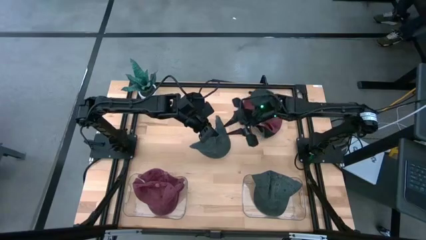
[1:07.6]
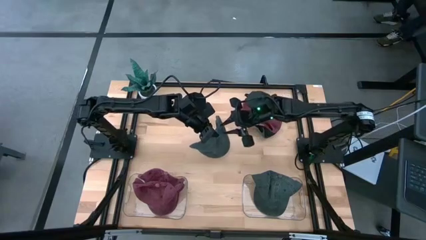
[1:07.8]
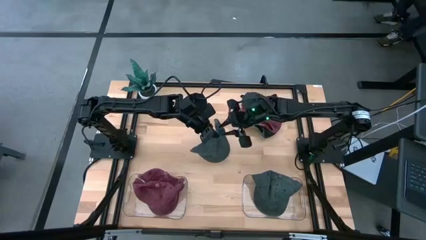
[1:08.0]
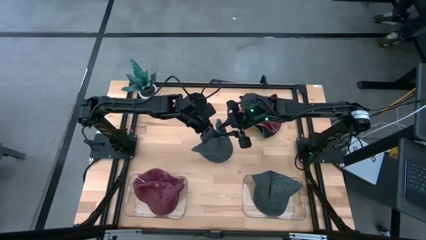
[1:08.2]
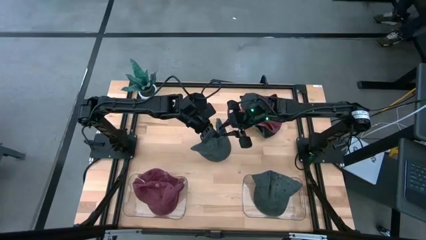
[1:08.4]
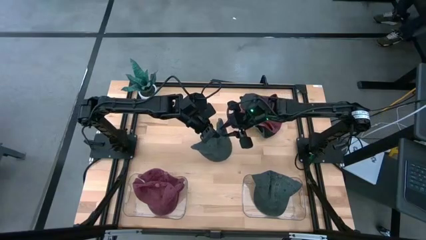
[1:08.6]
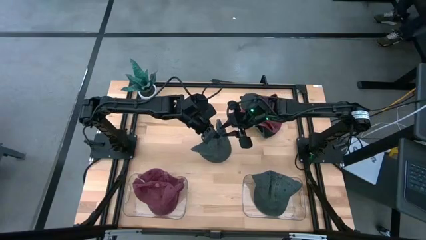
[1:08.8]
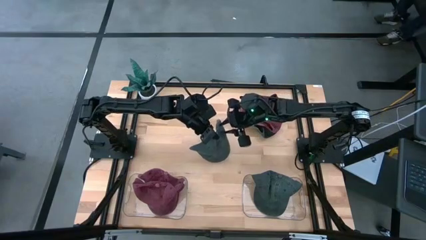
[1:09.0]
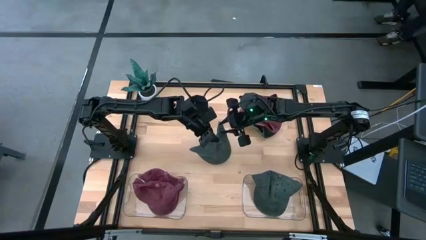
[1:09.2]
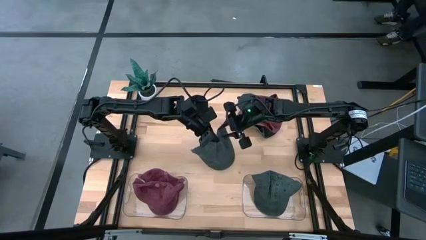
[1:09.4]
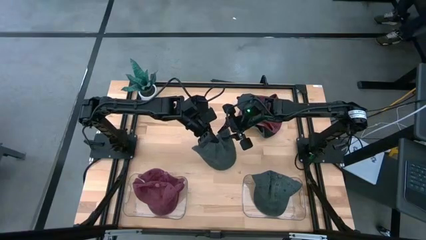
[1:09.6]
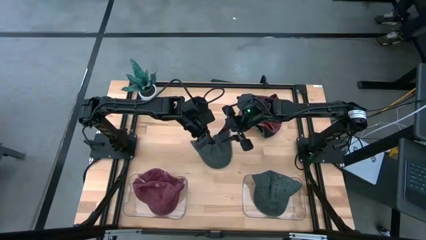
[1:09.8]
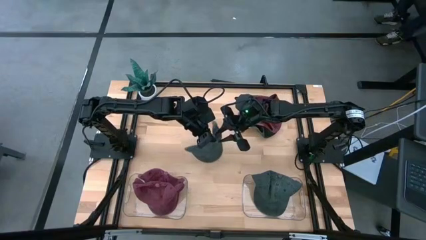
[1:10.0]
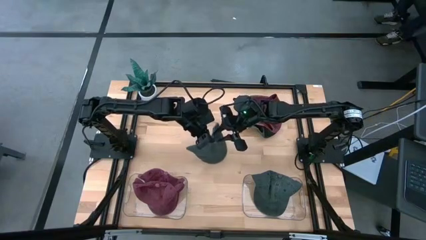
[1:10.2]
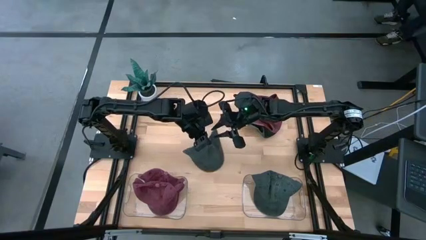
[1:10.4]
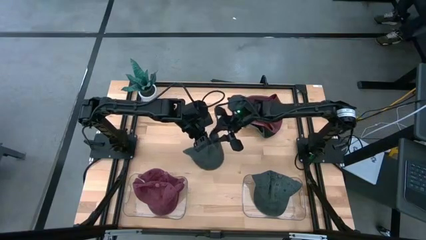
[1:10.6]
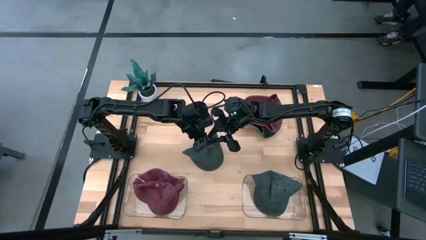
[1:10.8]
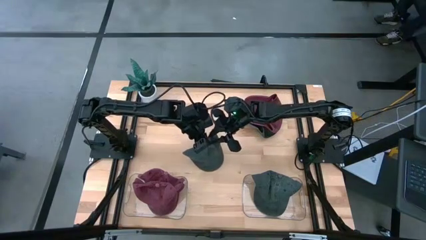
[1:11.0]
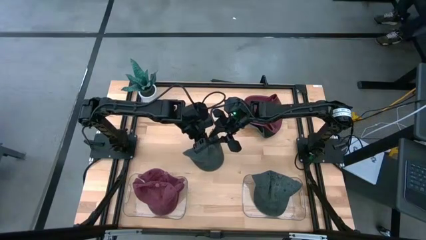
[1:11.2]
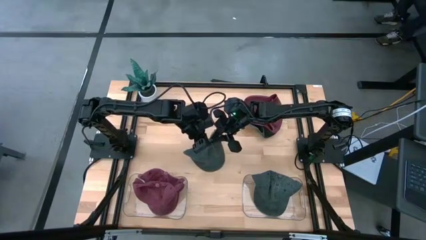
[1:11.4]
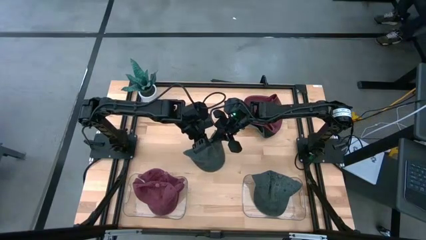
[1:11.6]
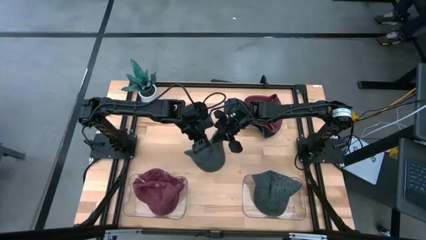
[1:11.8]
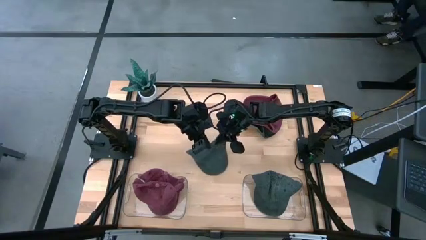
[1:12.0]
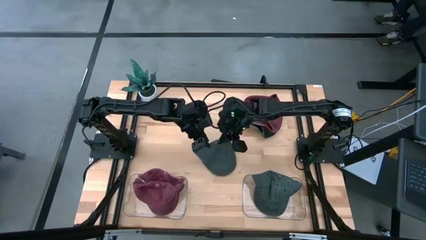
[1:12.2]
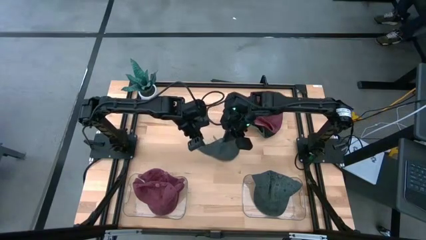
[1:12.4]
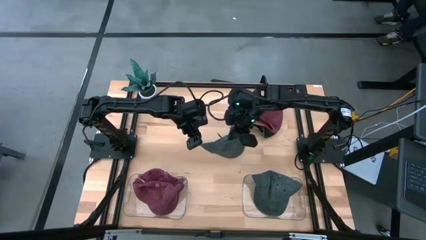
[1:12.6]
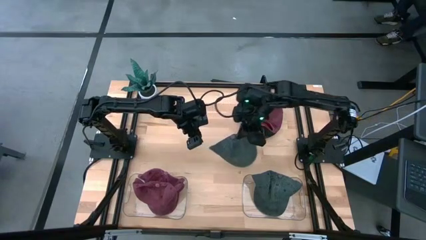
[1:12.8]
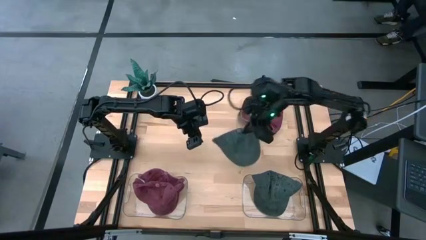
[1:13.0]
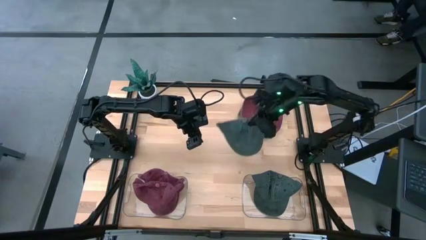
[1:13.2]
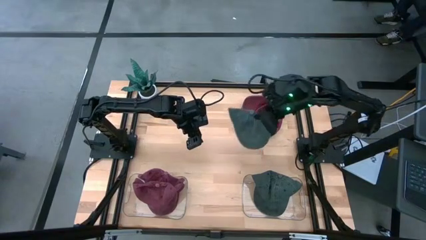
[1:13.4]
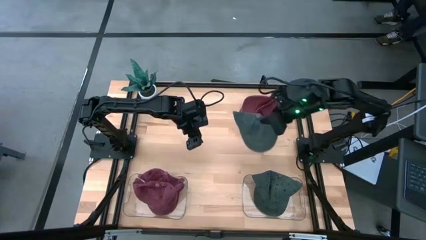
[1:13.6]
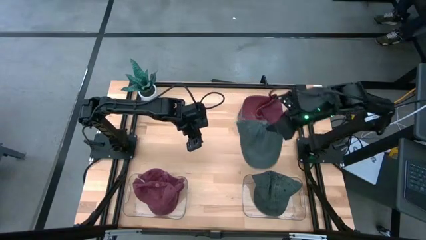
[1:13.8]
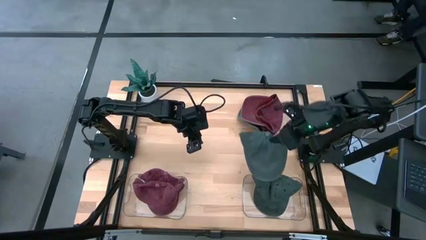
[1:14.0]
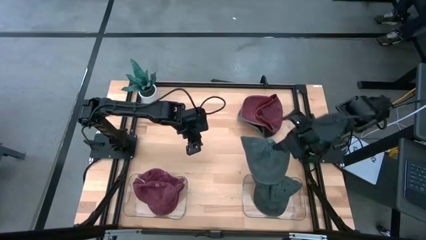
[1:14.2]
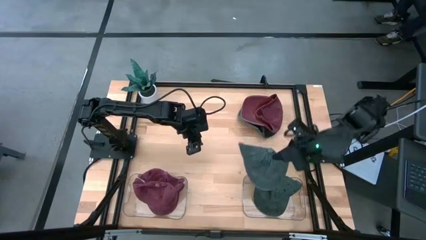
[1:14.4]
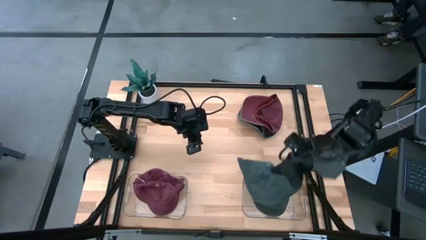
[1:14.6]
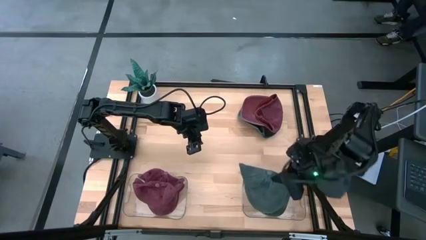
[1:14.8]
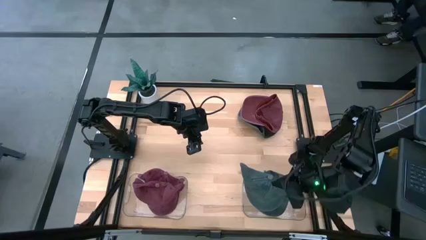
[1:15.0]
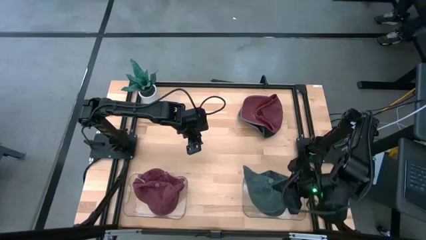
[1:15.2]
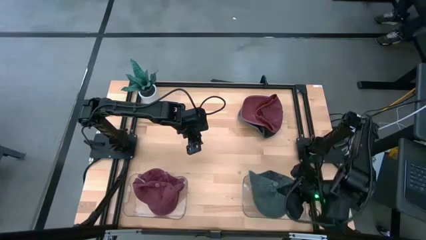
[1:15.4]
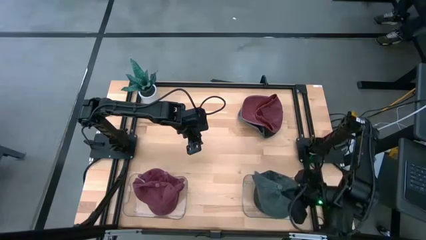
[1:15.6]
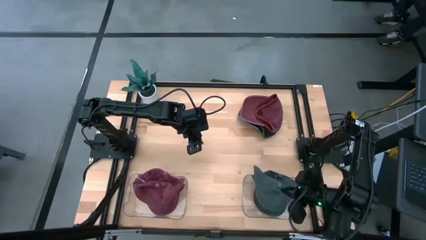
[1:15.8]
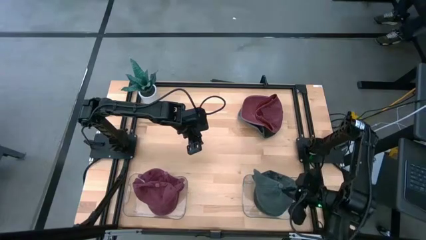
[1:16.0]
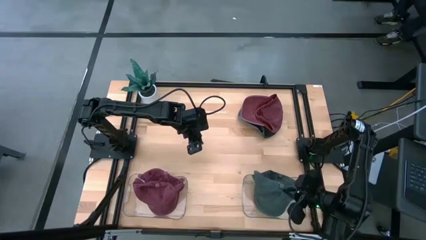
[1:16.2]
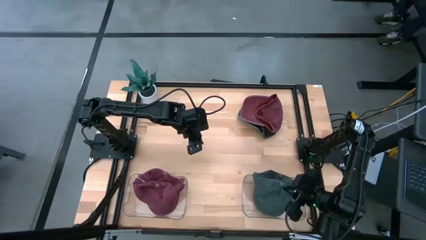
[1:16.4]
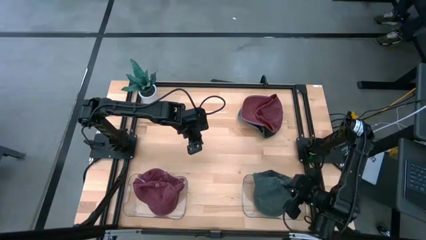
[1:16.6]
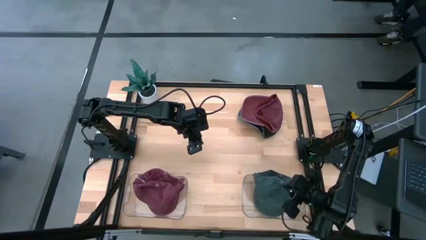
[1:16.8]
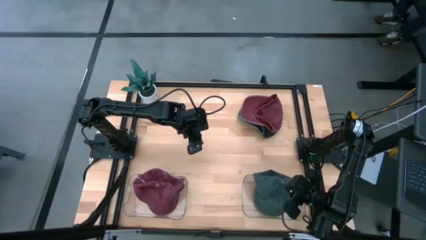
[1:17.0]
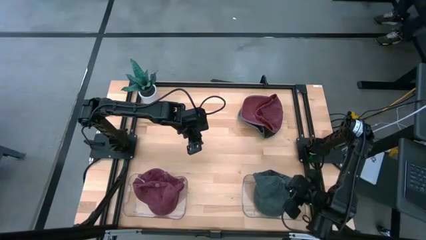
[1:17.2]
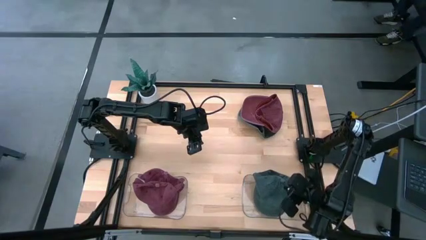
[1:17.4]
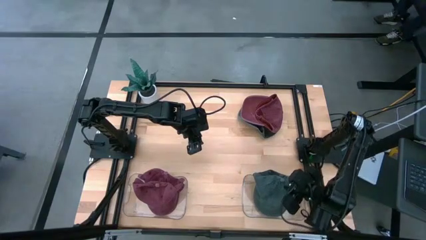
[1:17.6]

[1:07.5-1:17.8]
Task: Pick & Place hat
Put the bottom gray cap into the right transparent bin

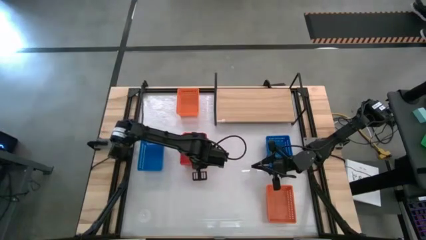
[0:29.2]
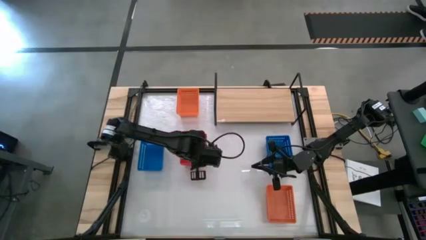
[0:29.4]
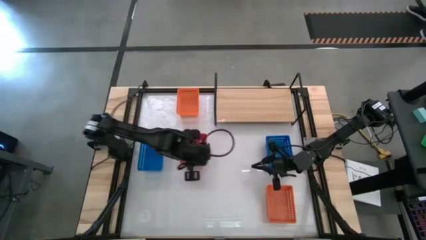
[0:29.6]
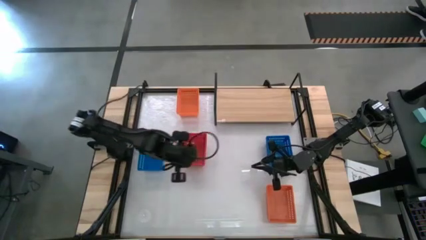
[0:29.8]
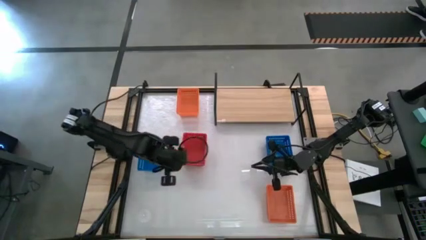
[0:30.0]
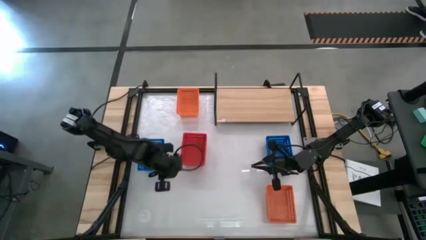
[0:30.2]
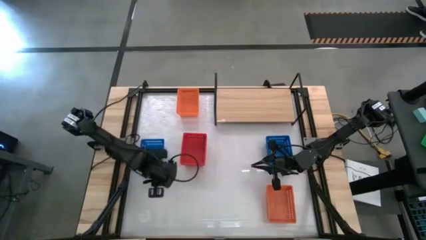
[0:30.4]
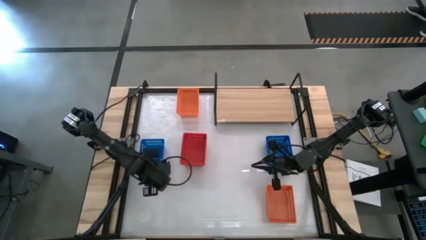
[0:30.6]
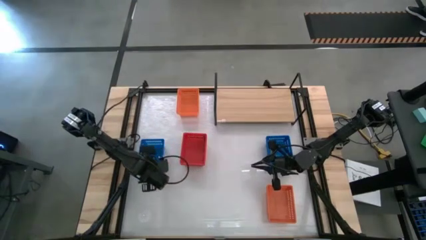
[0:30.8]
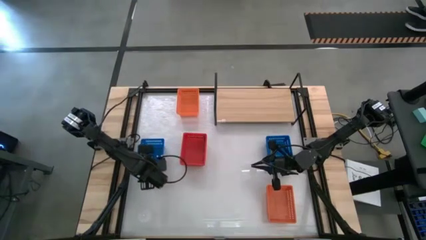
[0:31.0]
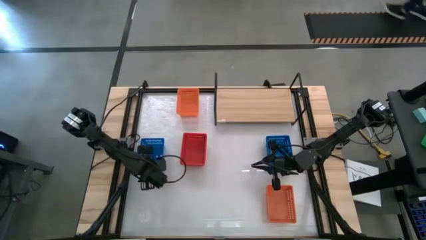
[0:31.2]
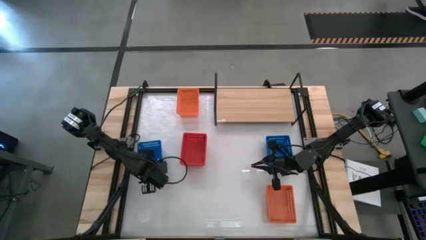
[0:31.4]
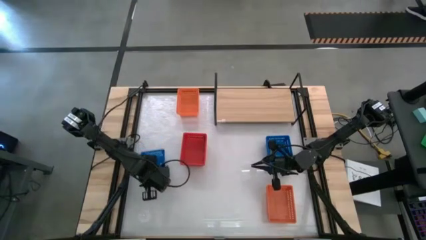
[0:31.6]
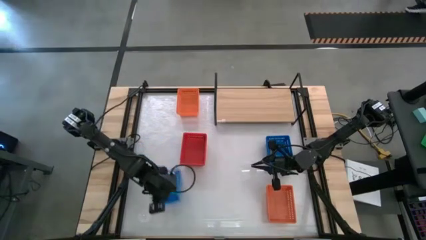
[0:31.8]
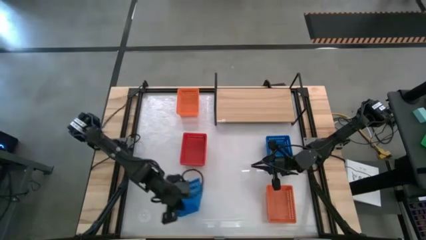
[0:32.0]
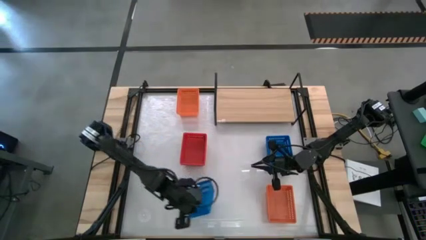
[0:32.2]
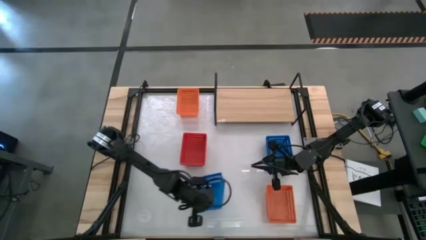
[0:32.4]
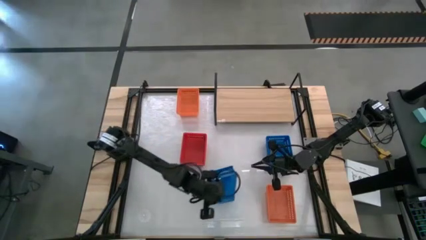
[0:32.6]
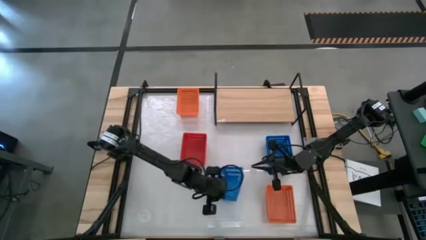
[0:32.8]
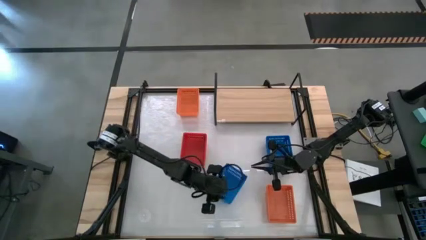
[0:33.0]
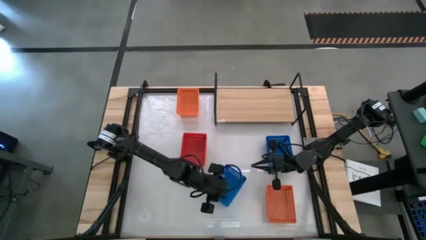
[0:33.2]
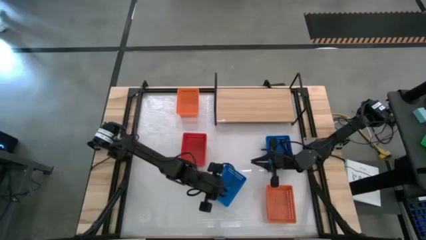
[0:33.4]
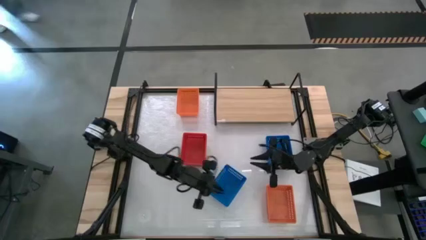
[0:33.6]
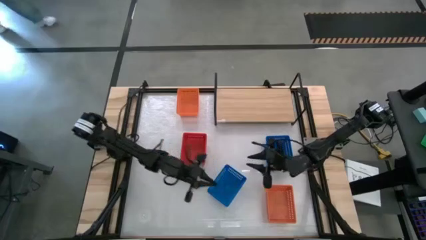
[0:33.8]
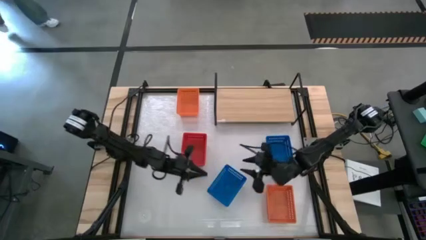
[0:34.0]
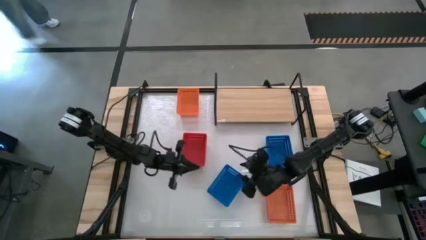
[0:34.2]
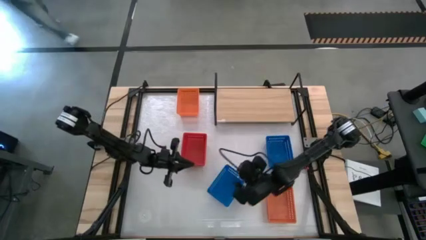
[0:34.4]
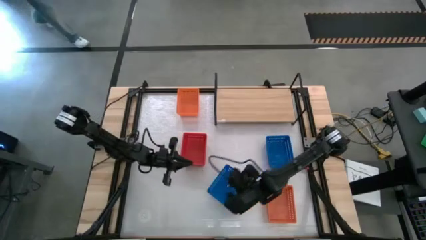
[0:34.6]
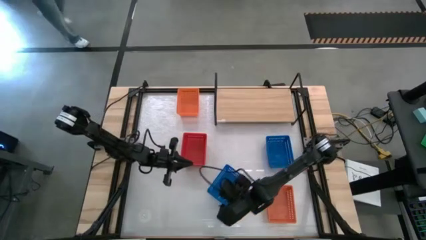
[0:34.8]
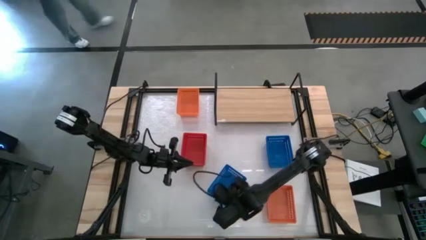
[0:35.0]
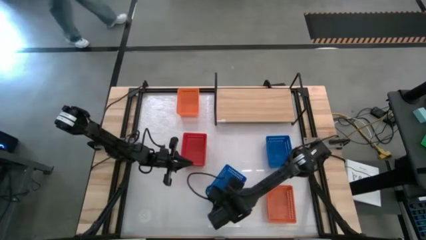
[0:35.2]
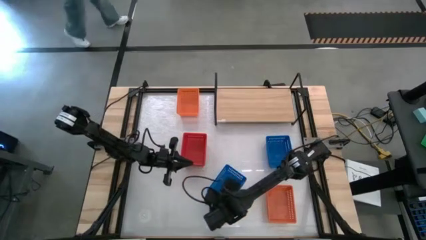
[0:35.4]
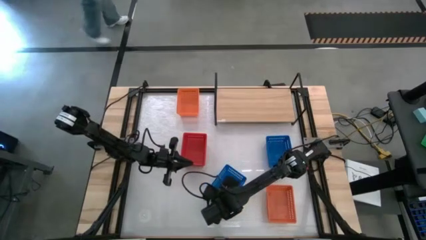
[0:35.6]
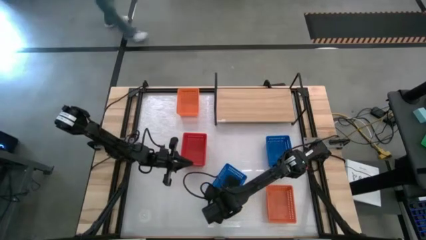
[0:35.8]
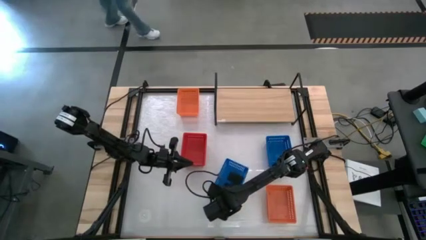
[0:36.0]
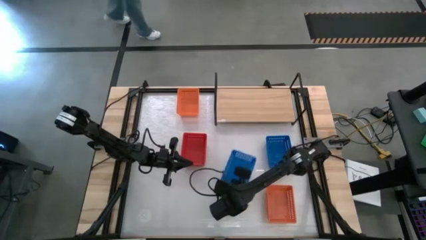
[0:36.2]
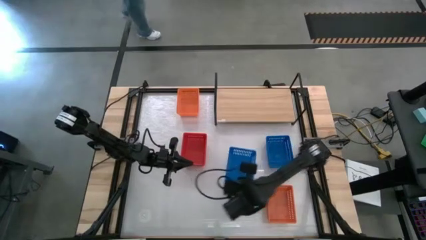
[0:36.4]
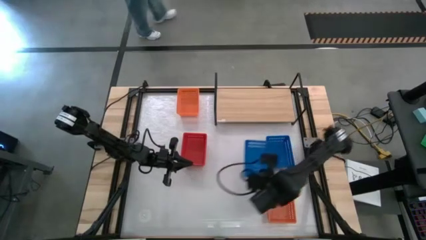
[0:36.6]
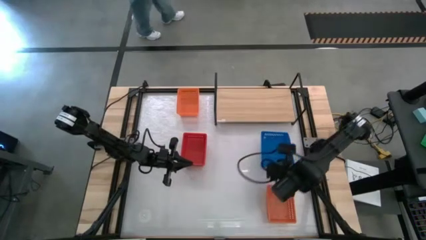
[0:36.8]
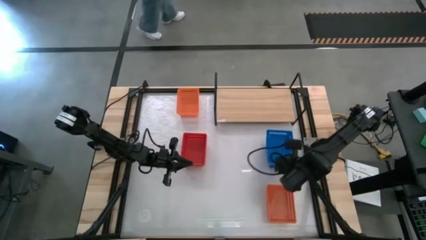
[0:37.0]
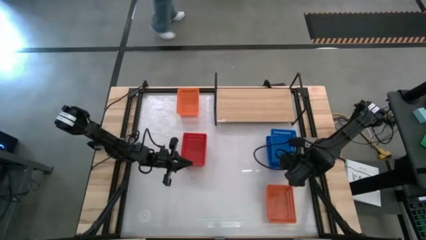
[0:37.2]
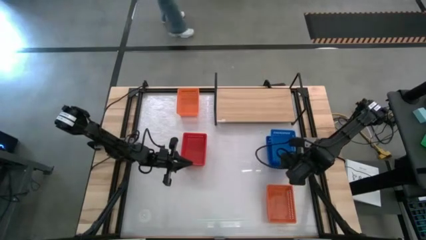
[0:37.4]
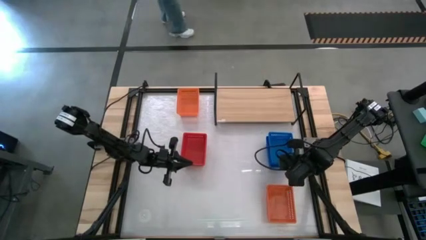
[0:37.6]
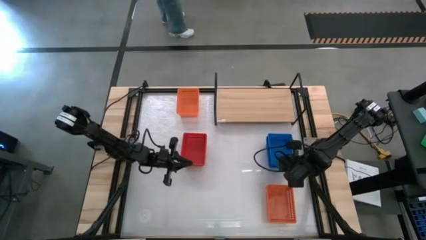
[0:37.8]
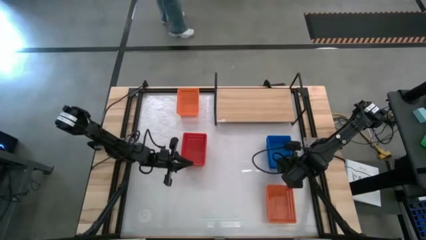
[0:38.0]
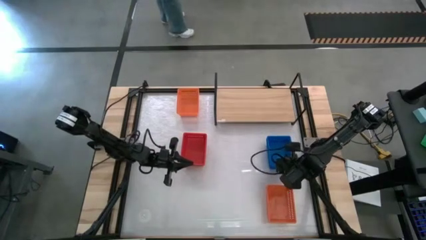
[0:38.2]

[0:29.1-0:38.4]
Task: Stack baskets on shelf by color
Stack the left blue basket on top of the right stacked blue baskets
